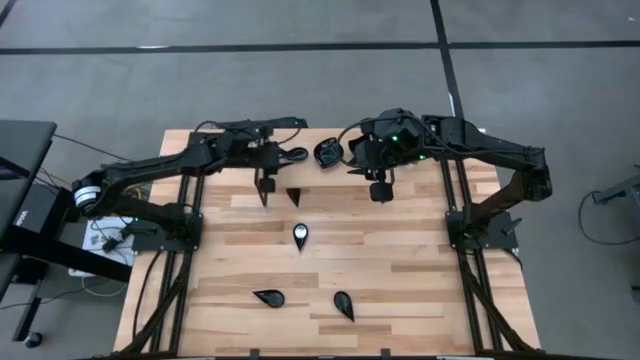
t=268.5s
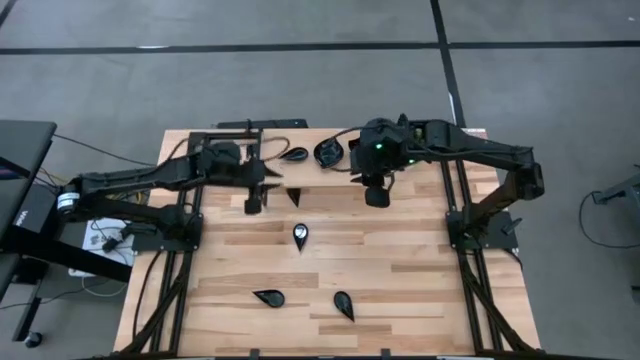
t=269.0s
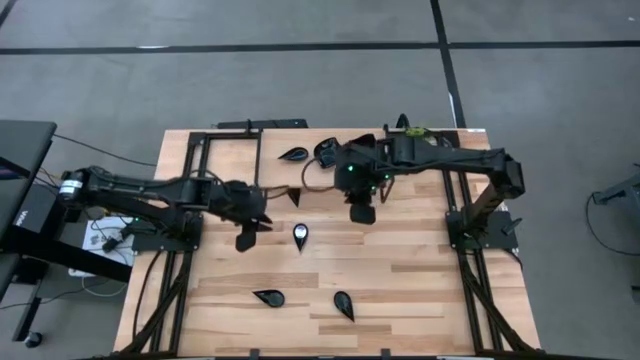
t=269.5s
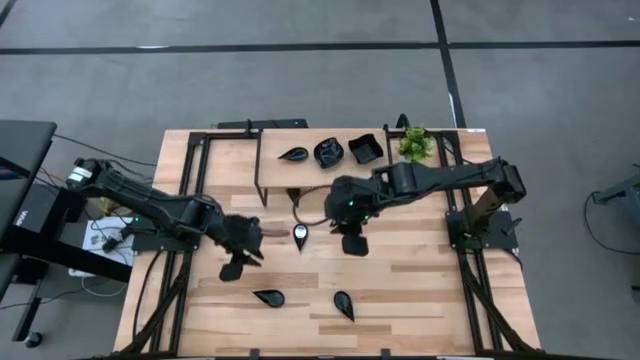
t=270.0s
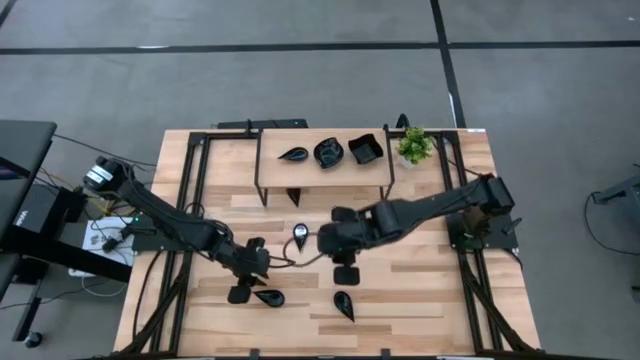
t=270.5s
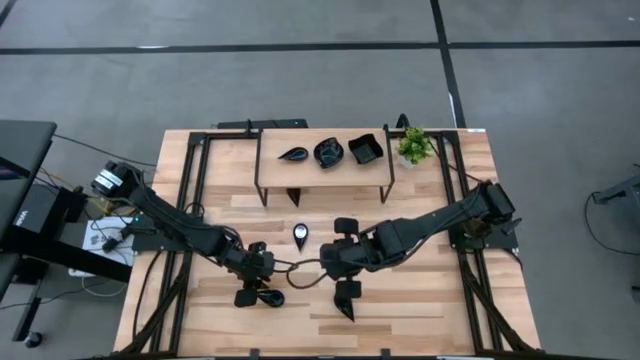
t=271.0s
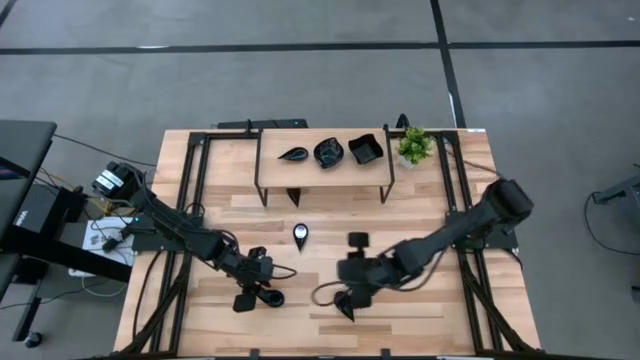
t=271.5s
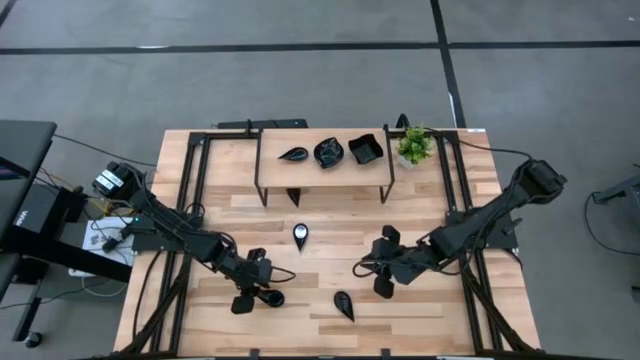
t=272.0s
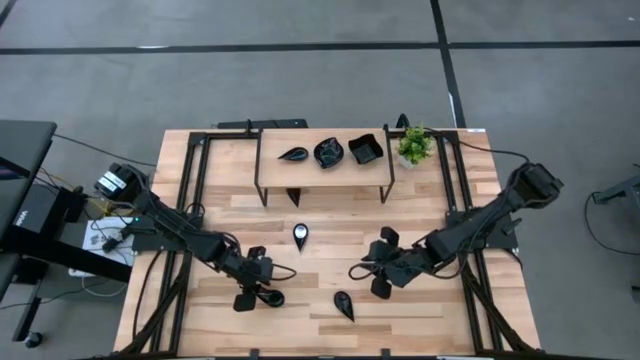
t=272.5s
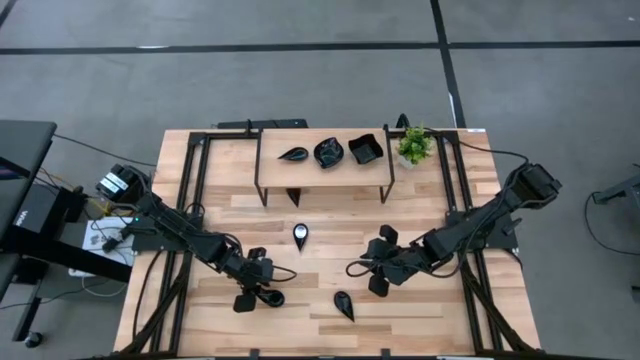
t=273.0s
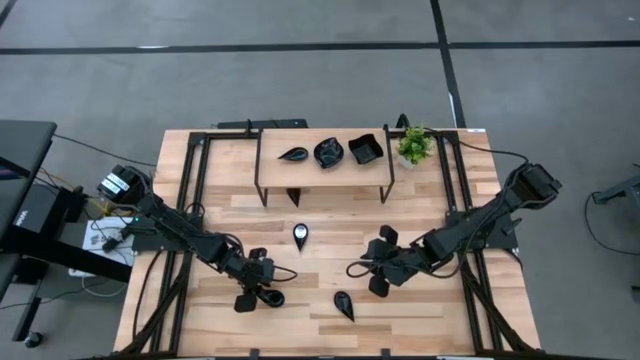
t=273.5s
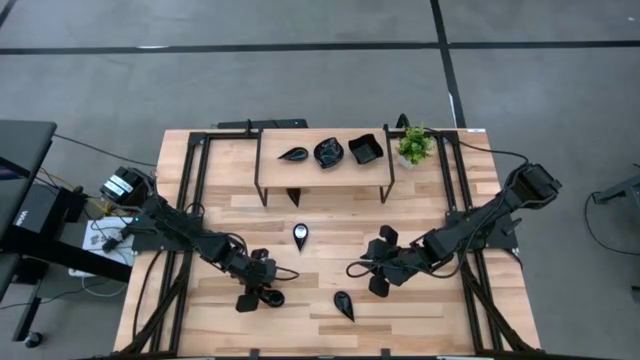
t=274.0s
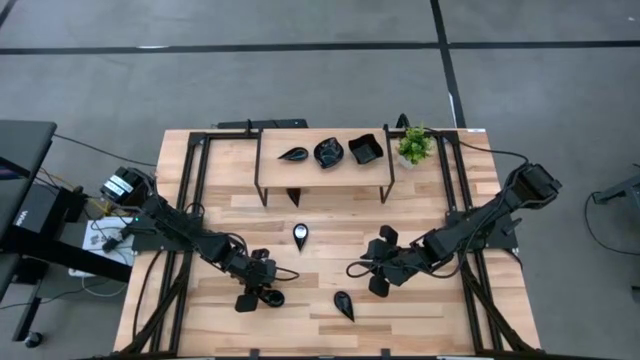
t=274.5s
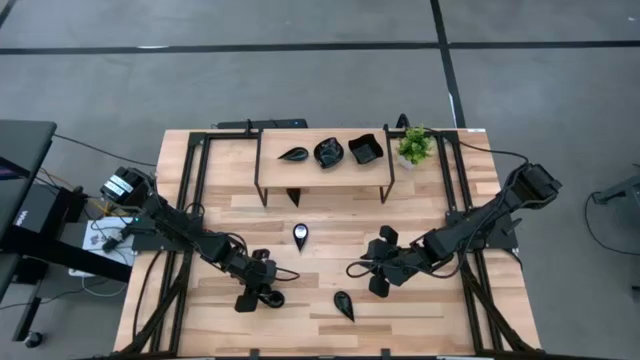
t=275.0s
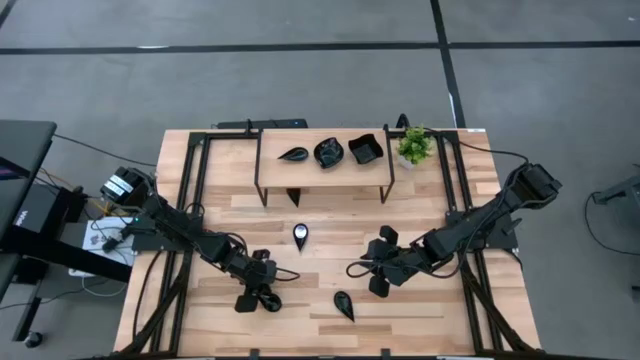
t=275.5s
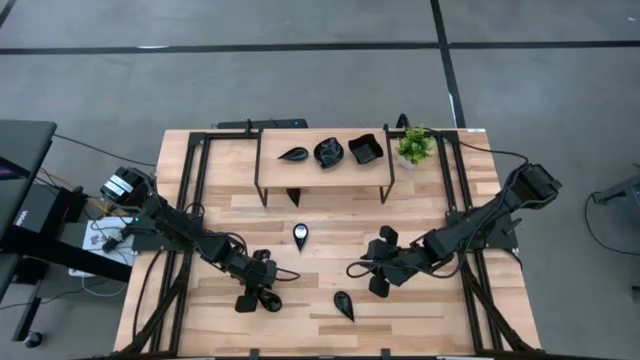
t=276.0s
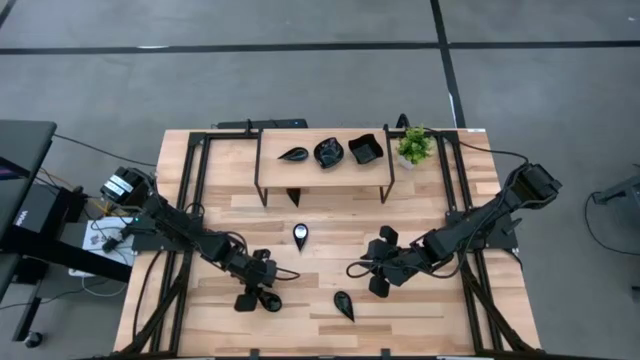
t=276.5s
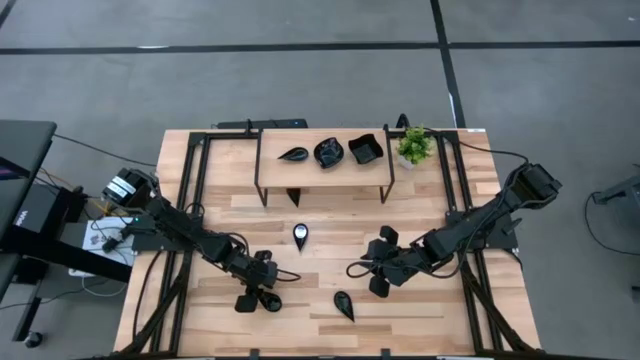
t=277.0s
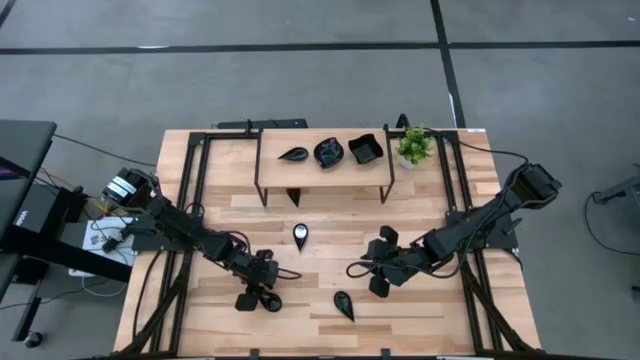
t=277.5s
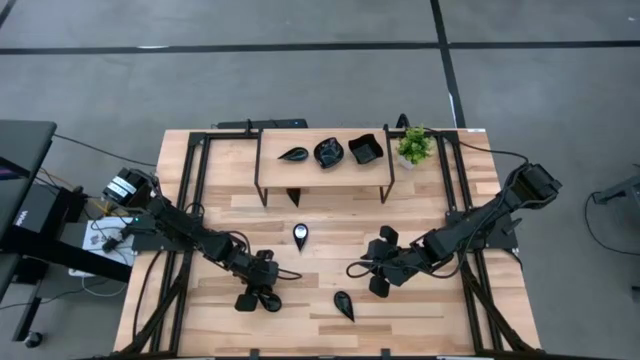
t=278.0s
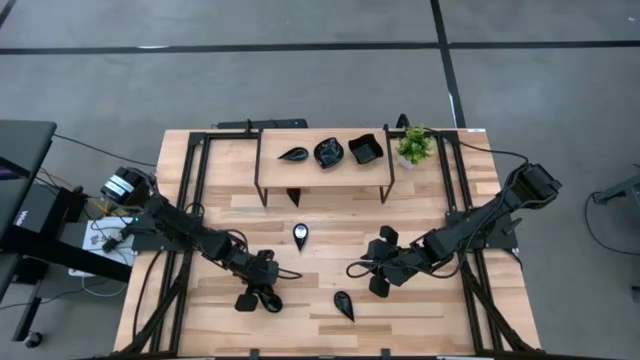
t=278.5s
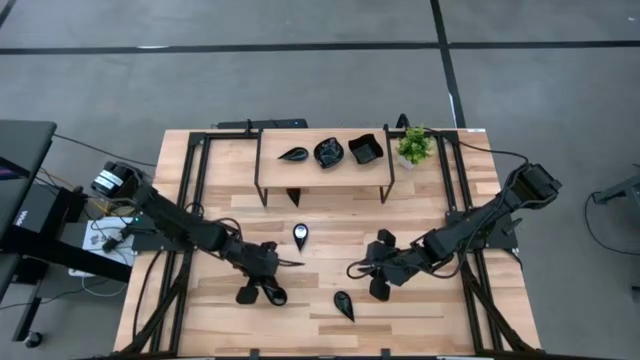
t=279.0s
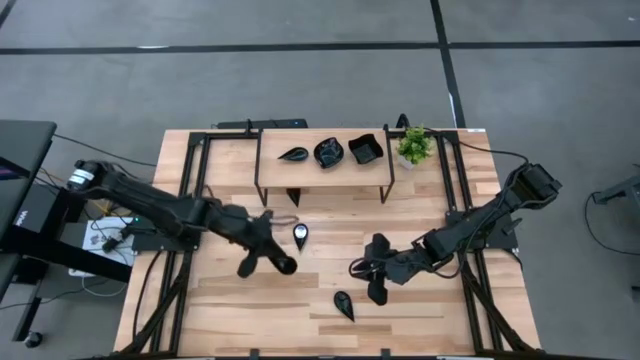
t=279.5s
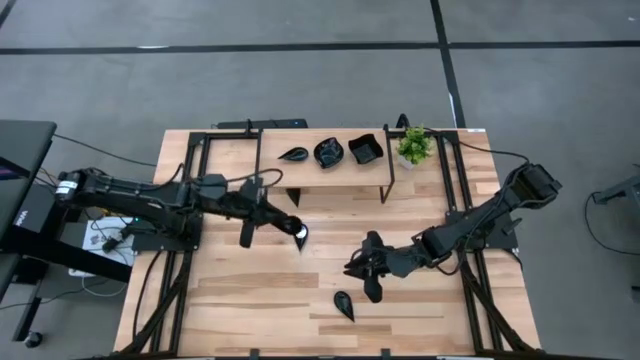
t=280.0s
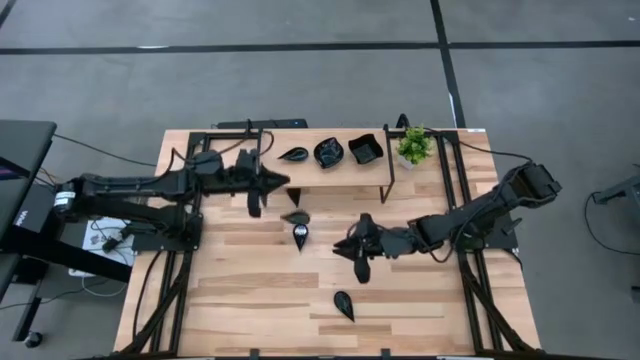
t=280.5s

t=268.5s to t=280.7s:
Task: Pick & Place Mini shaped plates
Stack the black drop shaped plate on the black drop shaped plate on the shelf

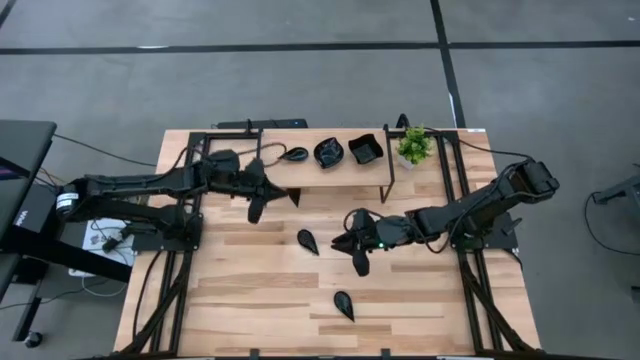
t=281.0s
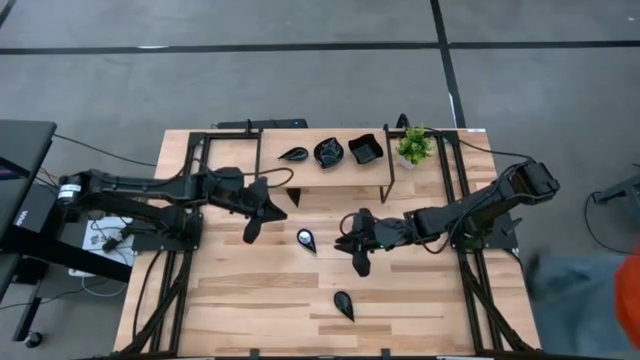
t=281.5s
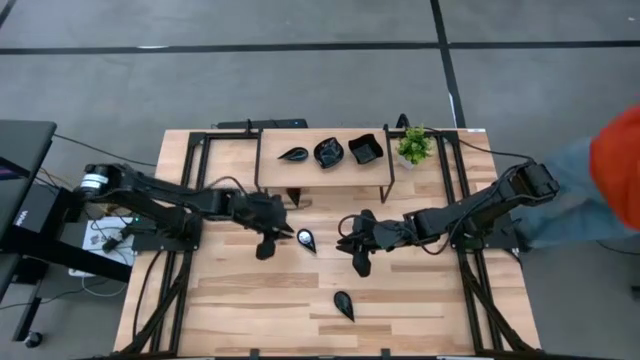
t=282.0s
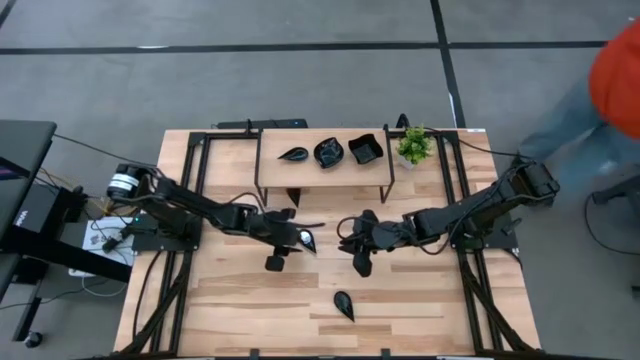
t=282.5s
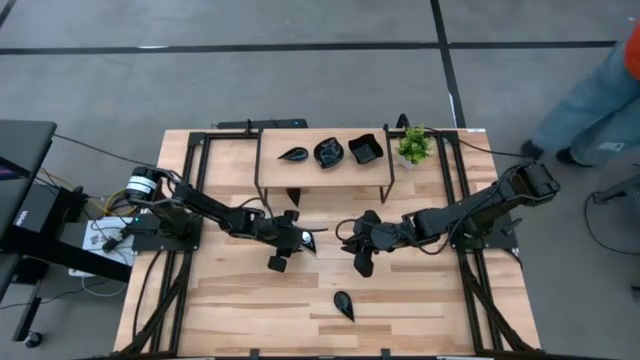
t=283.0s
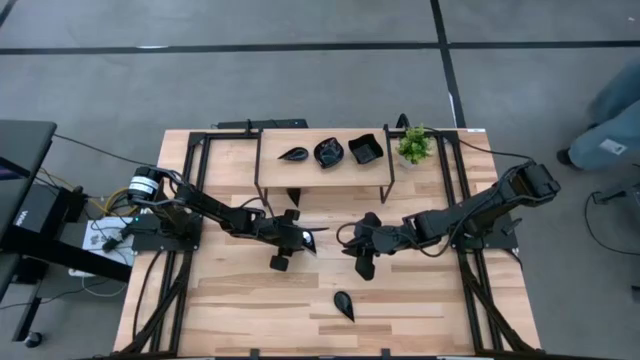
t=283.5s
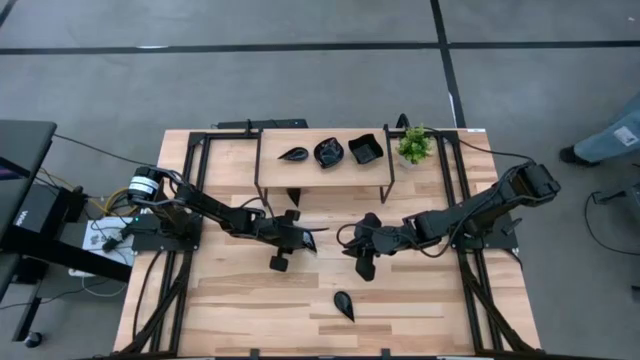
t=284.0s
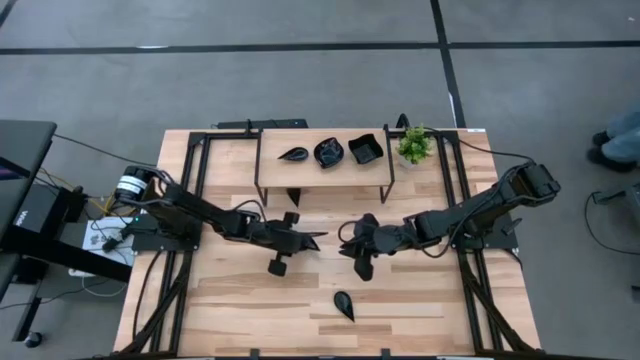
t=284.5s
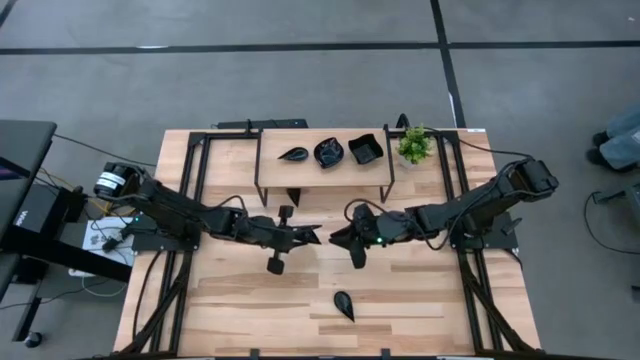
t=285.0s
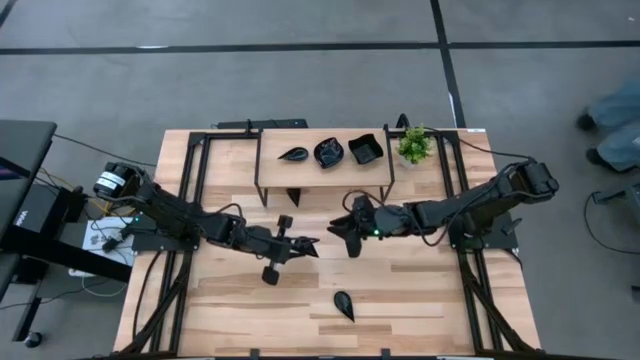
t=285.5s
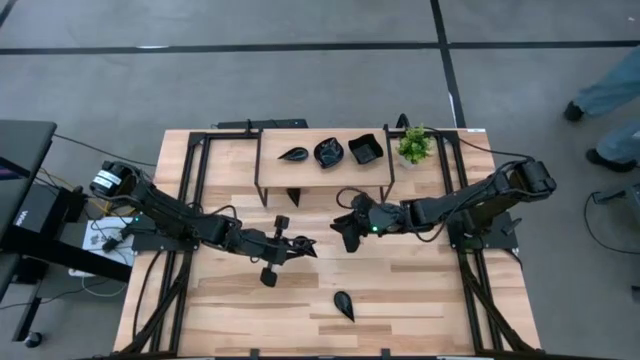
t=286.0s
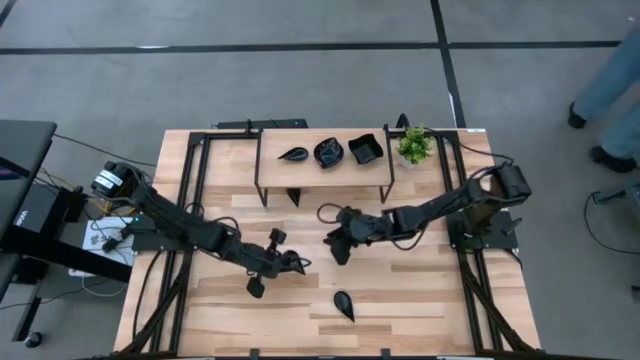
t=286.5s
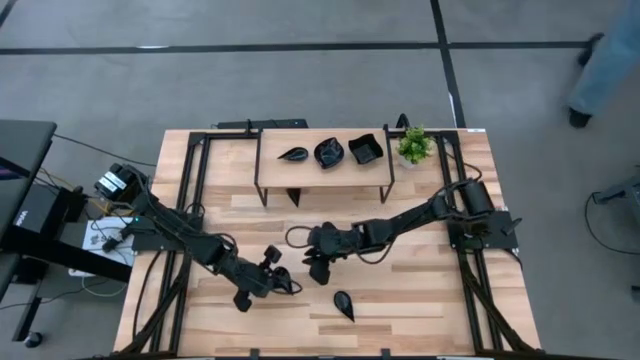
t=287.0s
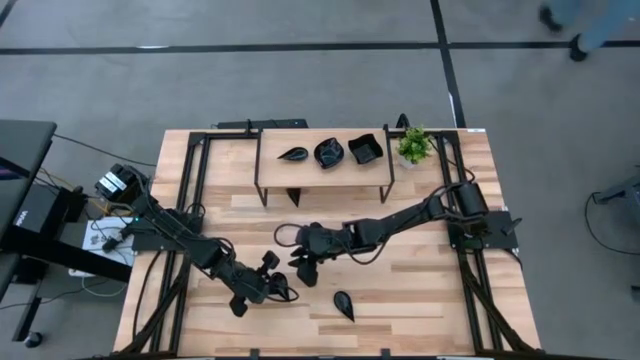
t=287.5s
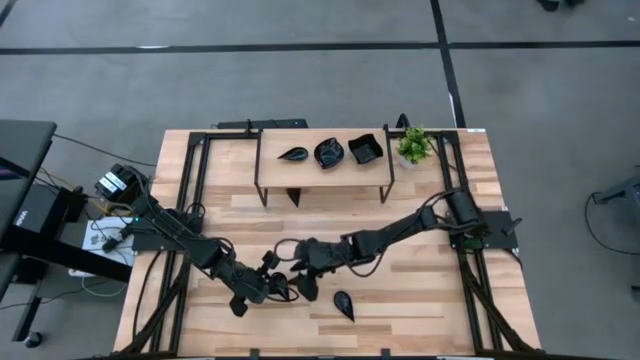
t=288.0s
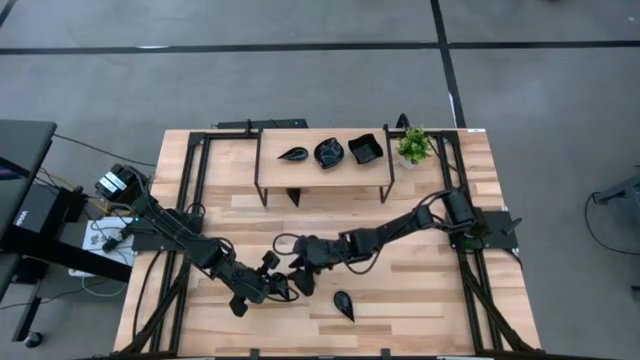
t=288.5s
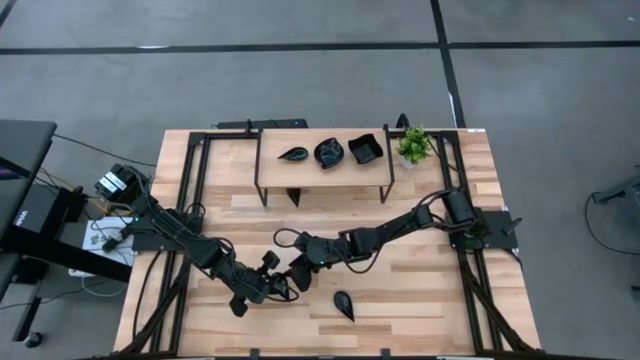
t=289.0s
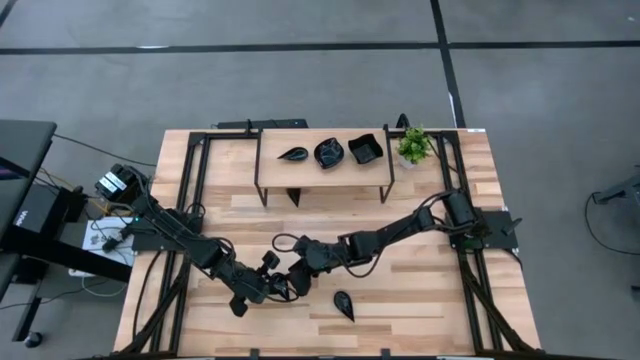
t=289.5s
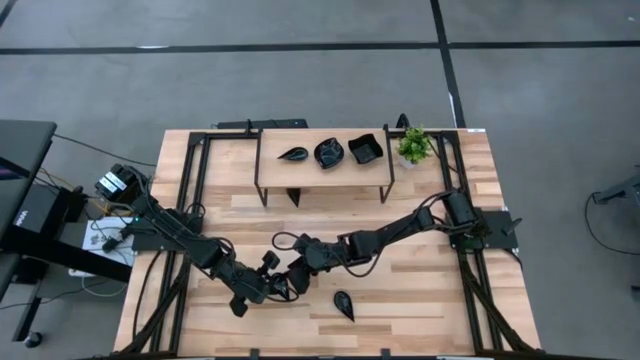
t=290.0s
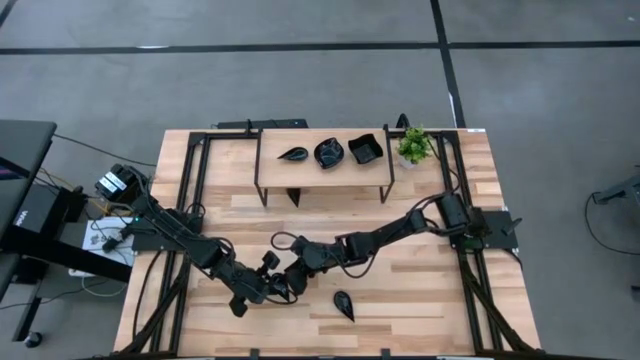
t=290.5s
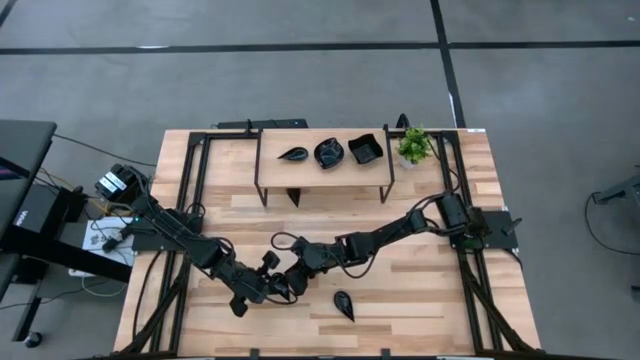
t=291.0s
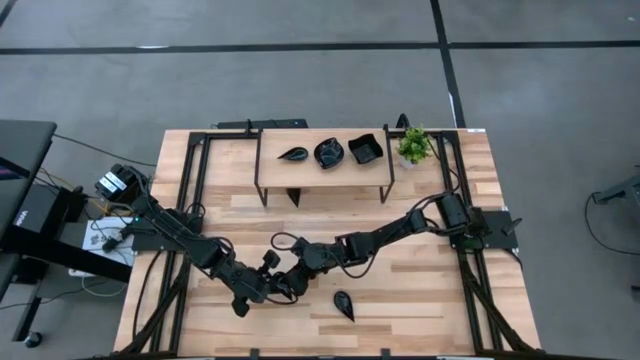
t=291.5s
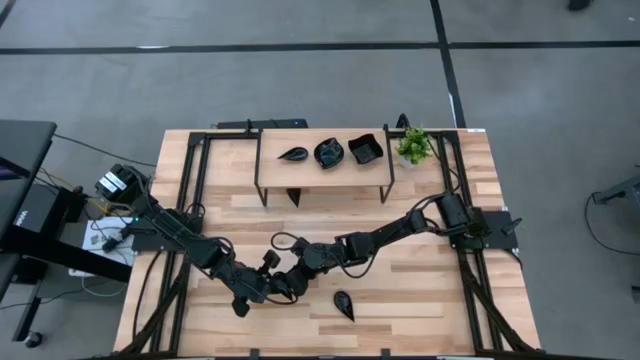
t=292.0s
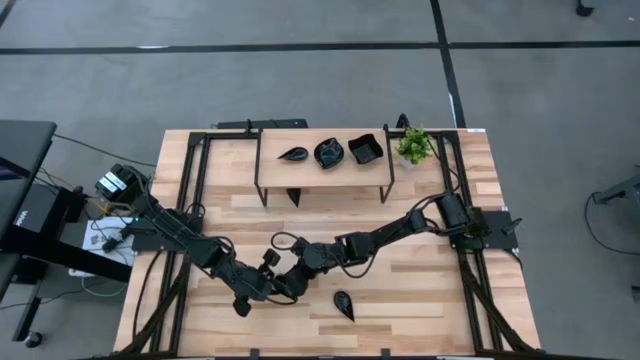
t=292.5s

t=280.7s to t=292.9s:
Stack the black drop shaped plate on the black drop shaped plate on the shelf
